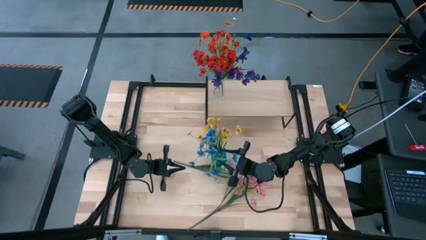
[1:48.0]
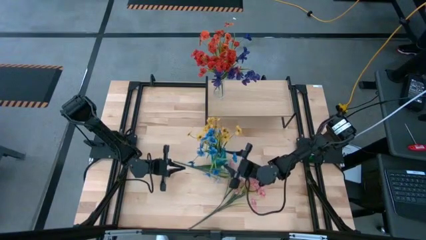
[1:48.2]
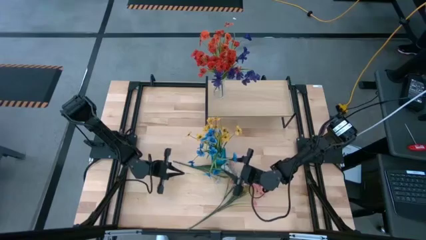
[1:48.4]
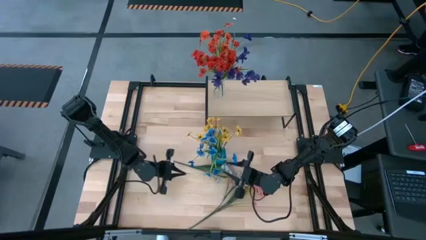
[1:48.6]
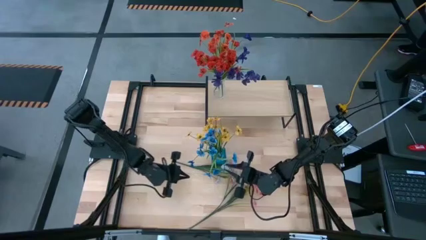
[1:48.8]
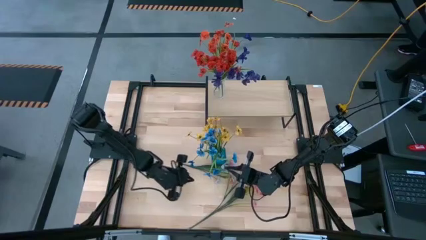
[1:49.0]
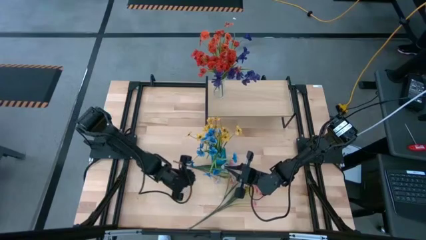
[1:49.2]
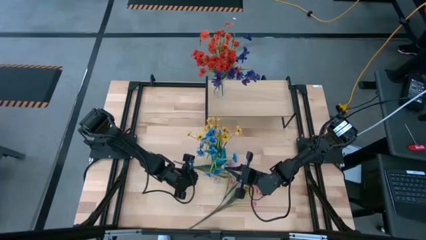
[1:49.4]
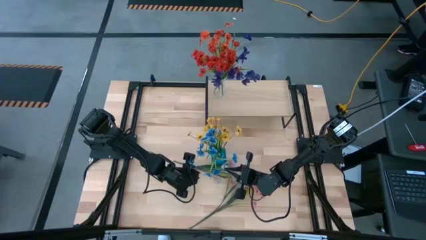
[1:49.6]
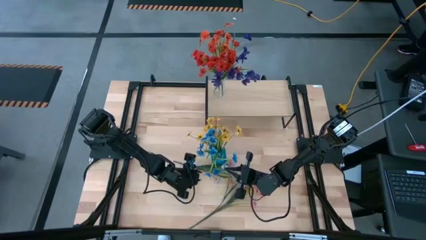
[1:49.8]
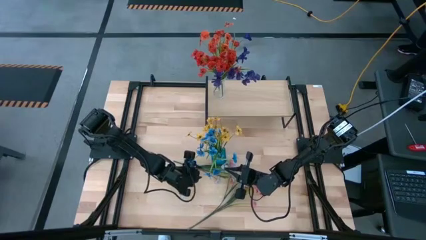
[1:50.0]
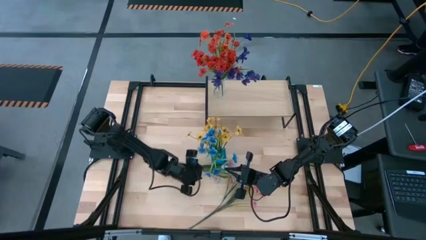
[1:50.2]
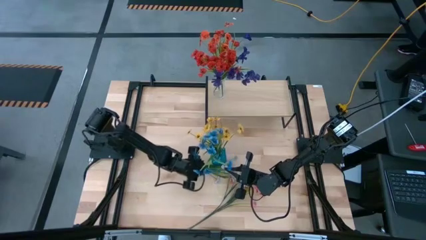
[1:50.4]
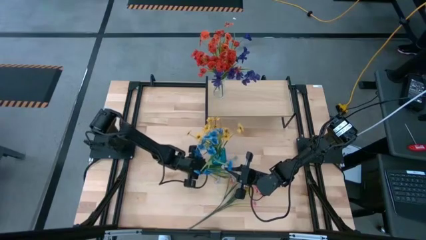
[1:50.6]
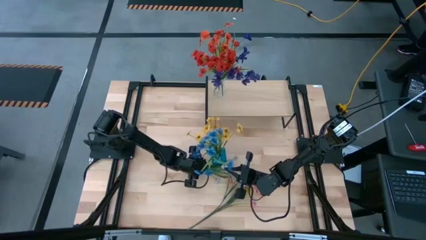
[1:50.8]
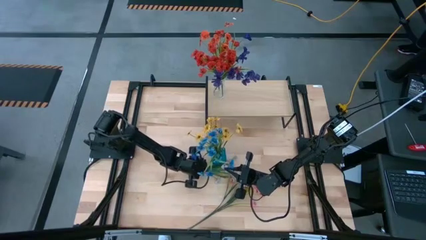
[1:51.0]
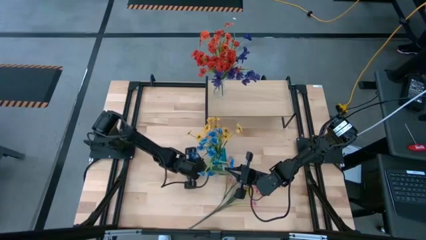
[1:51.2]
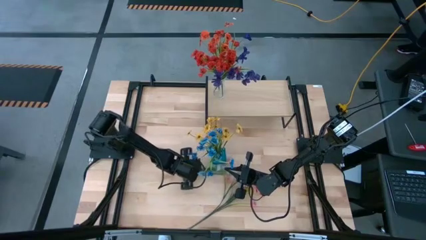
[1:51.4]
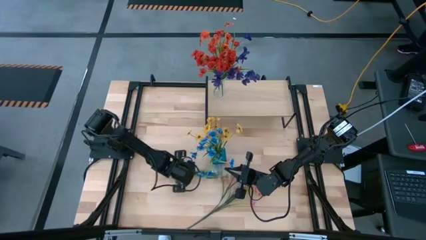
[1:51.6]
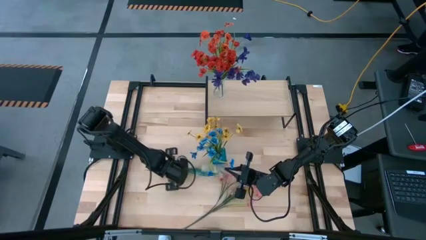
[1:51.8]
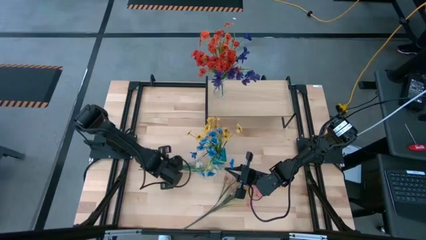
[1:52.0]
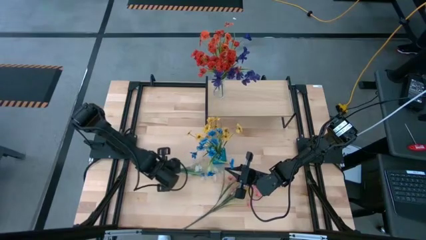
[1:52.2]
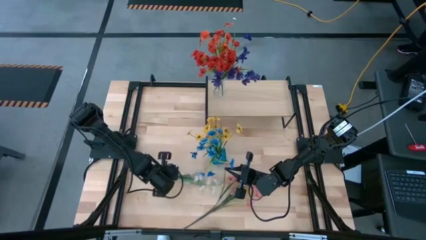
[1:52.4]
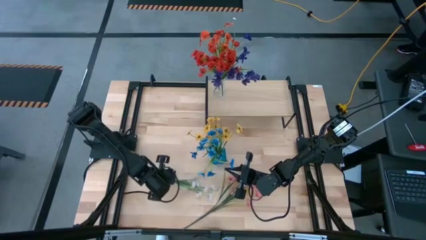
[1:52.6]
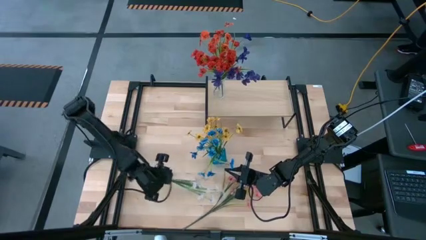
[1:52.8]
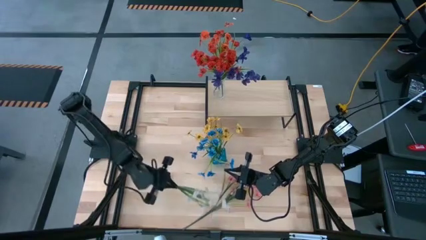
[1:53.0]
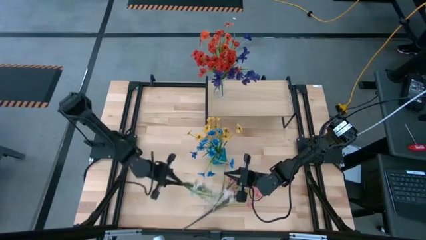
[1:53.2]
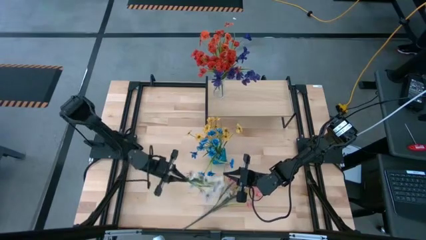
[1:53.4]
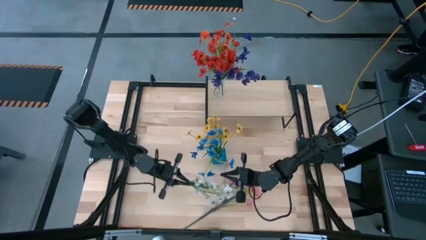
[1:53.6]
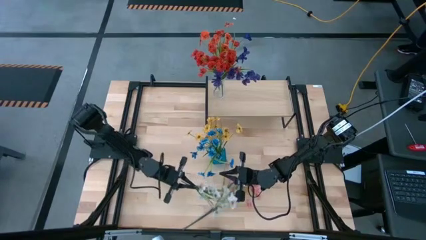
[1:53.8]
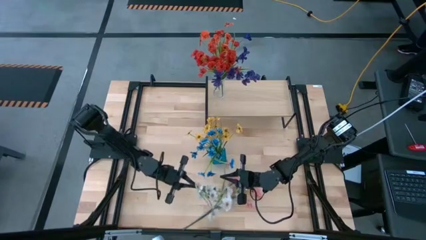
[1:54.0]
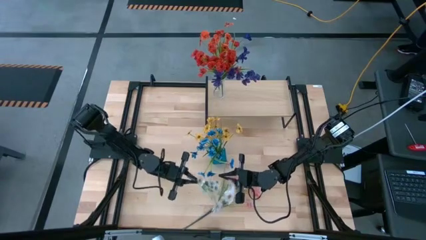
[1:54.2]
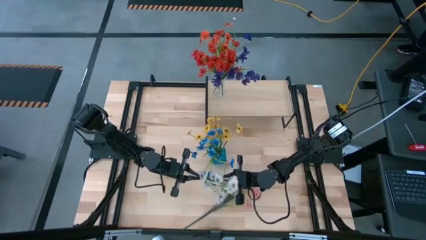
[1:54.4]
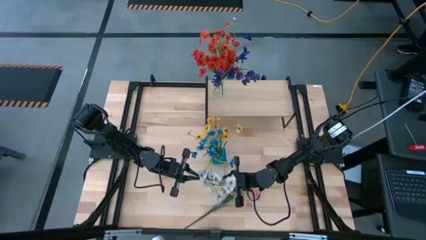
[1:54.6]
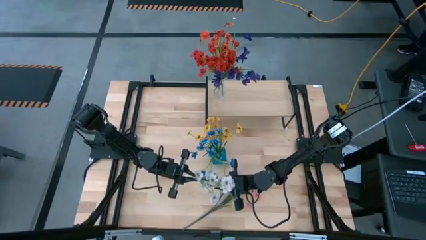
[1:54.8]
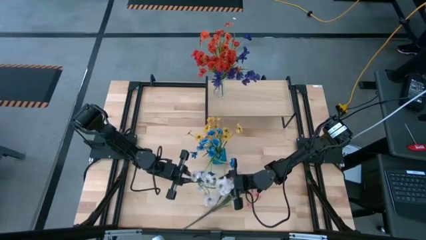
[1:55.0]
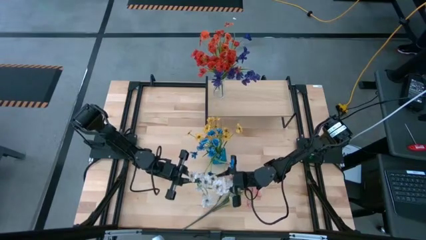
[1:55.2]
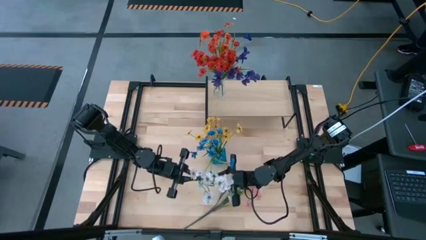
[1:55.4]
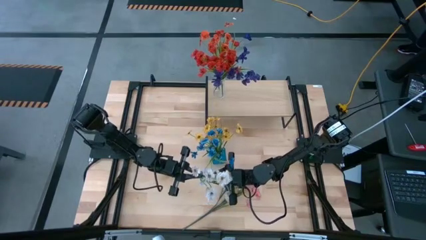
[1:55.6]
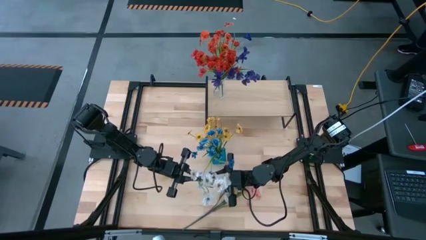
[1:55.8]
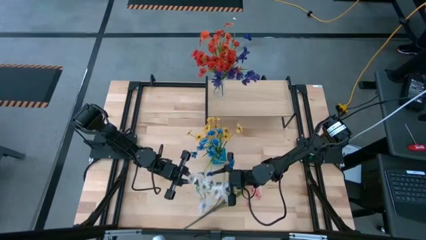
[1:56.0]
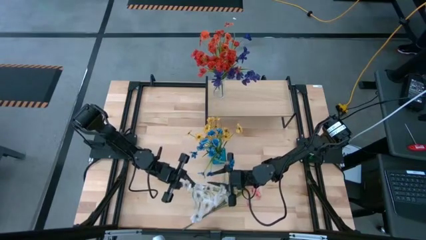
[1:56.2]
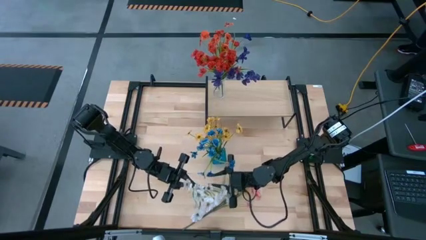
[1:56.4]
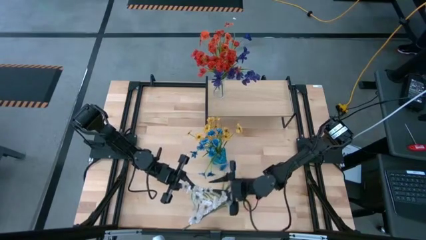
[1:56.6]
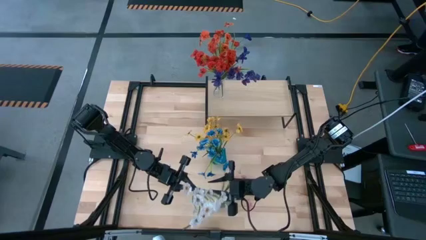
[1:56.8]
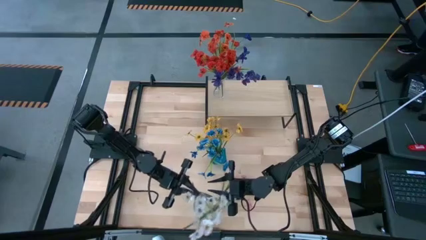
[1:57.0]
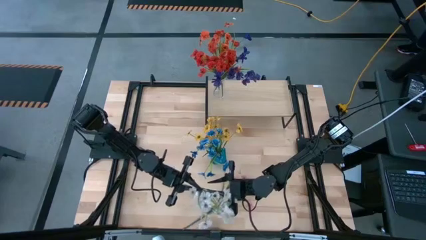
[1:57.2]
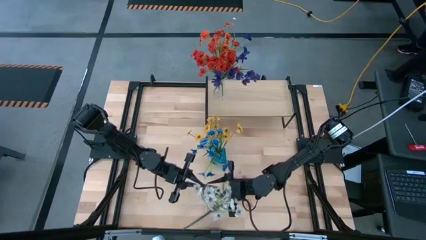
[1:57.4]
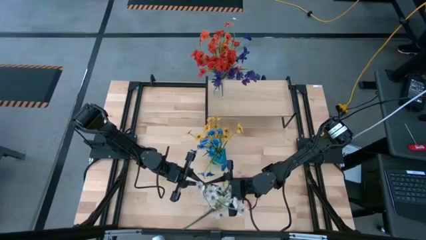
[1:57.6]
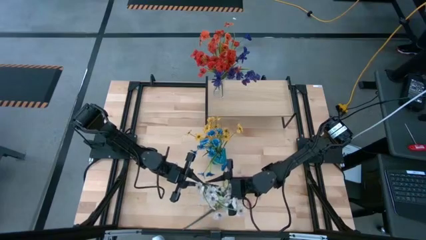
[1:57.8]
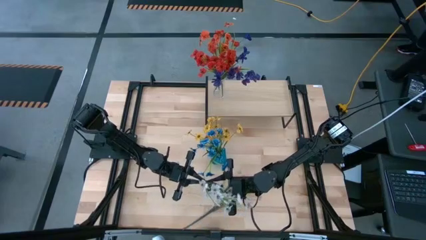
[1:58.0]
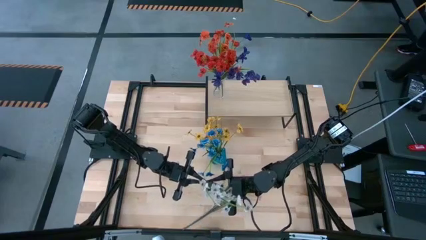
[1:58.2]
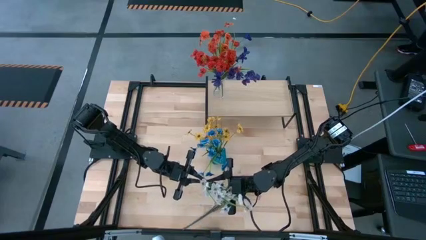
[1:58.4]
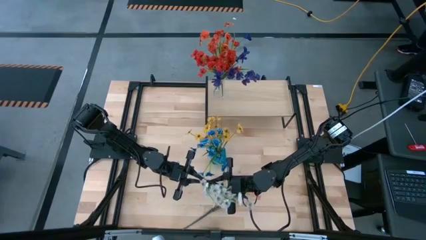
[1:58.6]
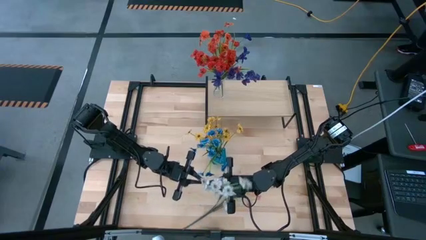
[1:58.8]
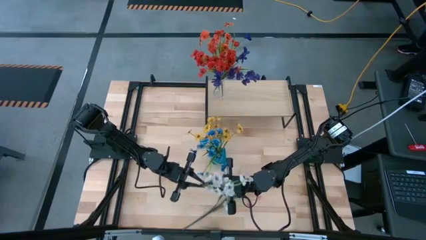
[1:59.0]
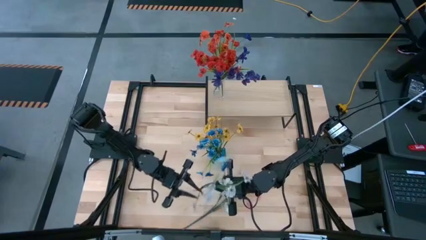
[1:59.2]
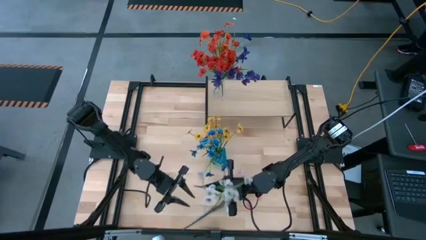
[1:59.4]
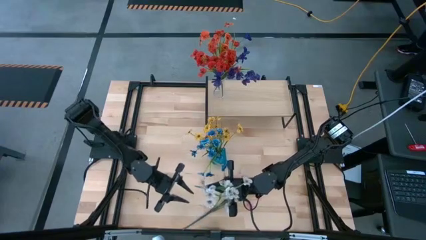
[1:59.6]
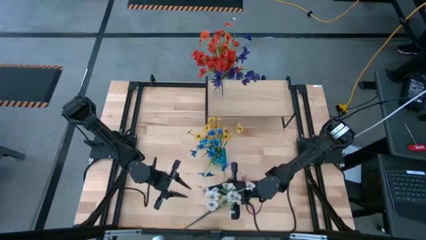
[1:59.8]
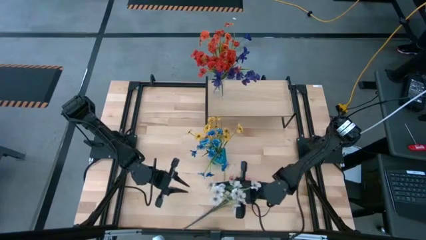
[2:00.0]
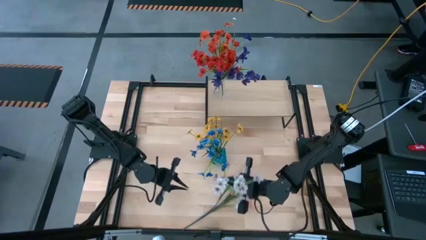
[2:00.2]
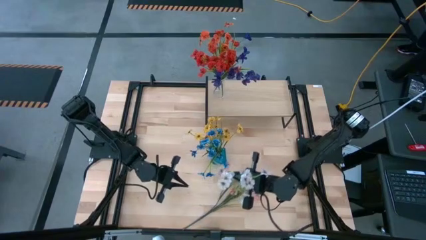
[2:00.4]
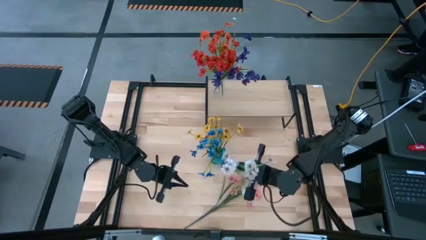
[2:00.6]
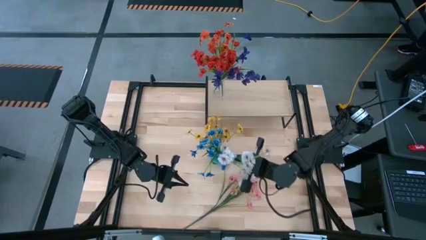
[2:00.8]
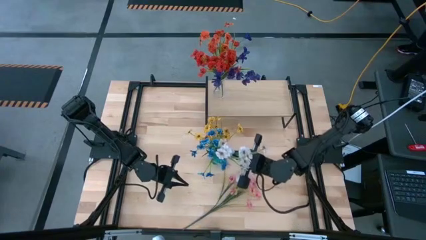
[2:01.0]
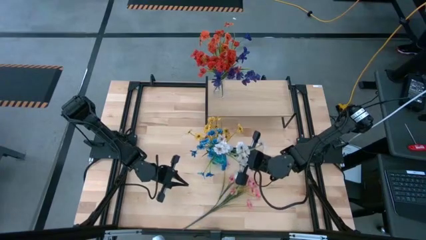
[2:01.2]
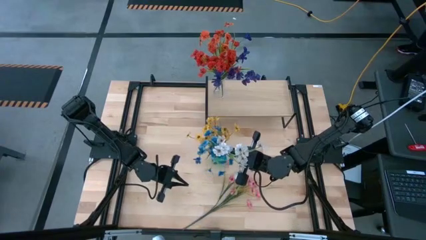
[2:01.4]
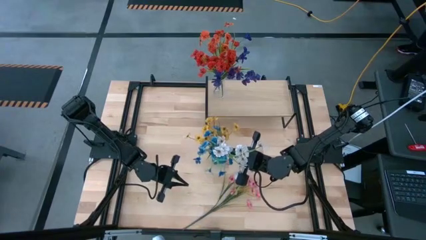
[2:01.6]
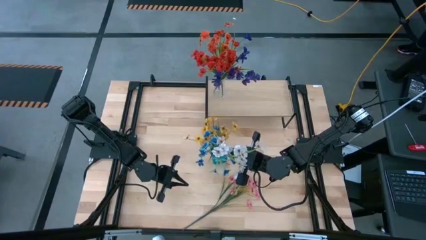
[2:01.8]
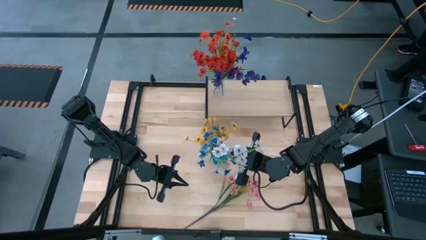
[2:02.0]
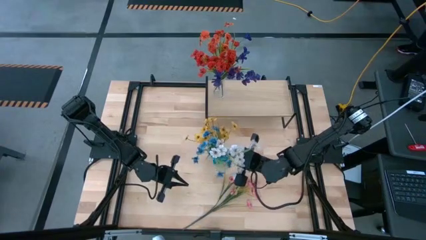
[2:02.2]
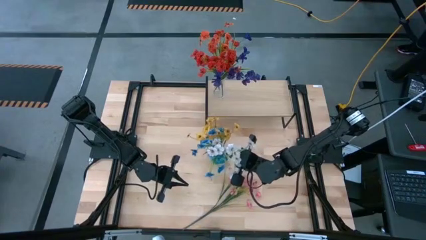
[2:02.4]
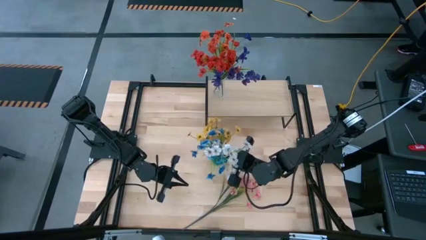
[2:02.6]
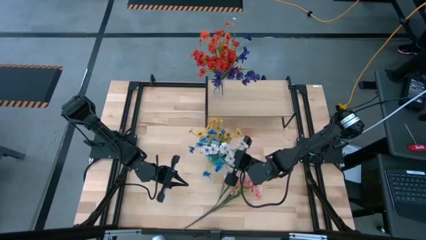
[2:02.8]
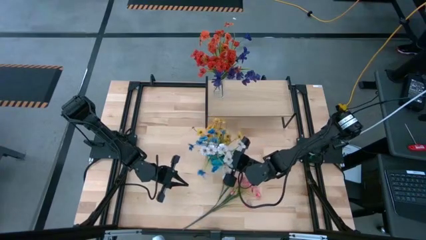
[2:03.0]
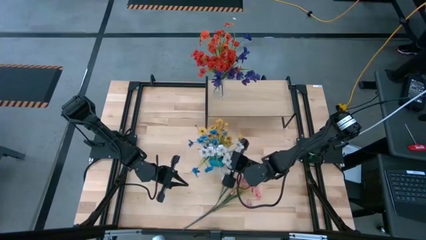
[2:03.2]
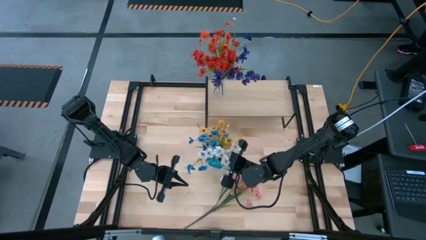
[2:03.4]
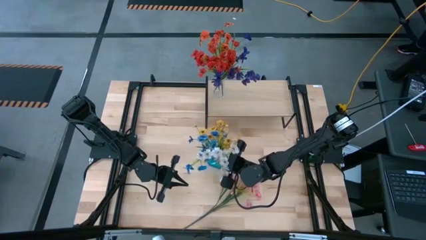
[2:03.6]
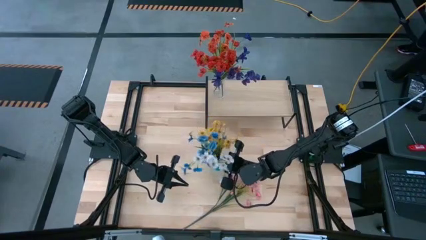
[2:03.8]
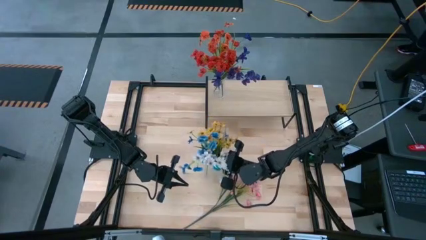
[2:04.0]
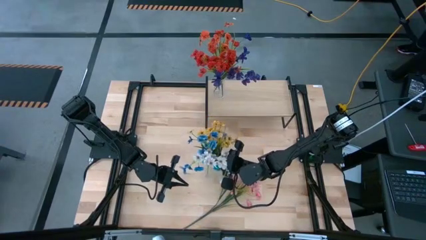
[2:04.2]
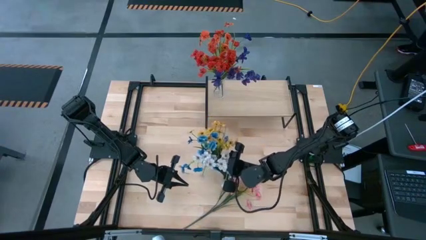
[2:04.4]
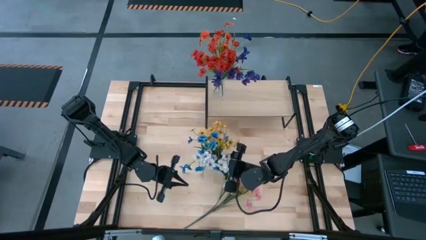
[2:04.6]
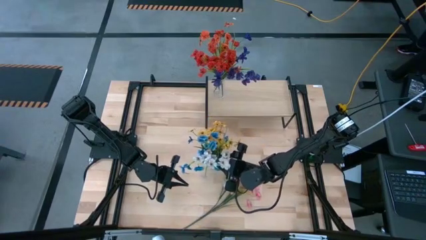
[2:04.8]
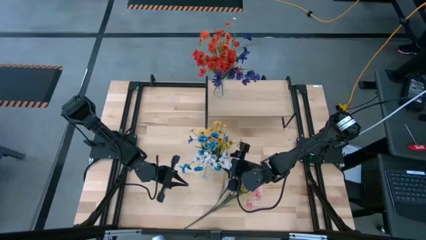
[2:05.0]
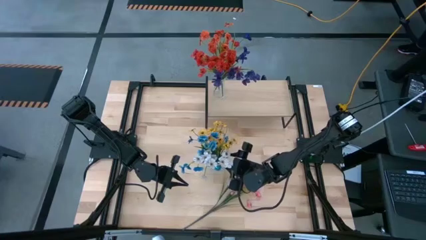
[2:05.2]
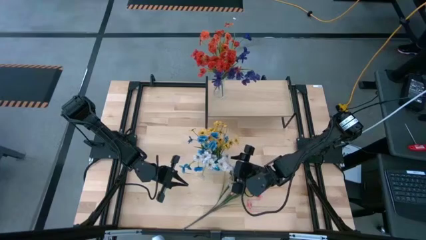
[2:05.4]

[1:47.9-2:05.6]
Task: Pick and place flowers into a vace then onto a shelf
Put the white flowers into the blue vase
